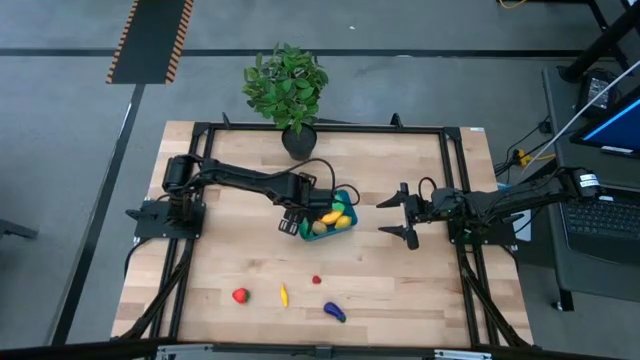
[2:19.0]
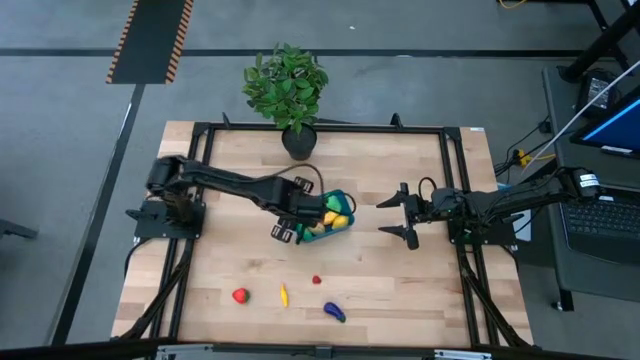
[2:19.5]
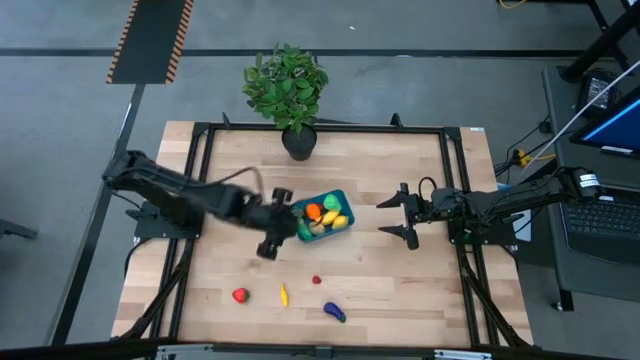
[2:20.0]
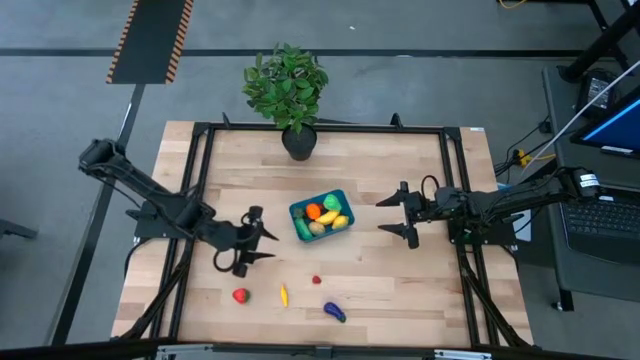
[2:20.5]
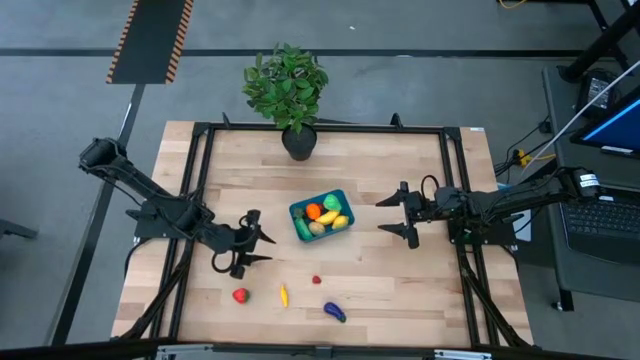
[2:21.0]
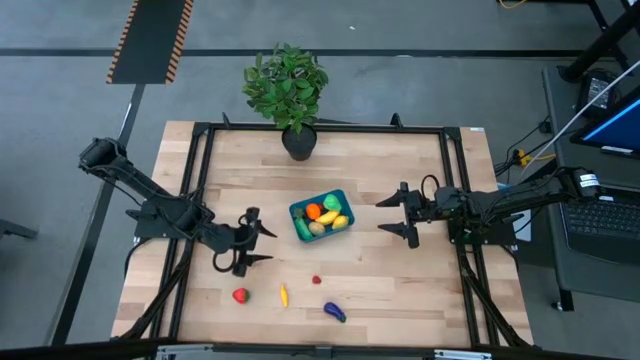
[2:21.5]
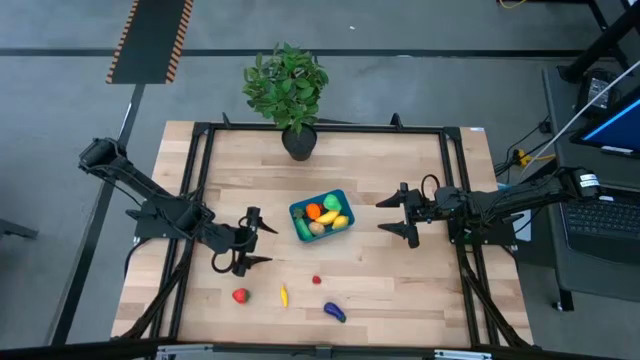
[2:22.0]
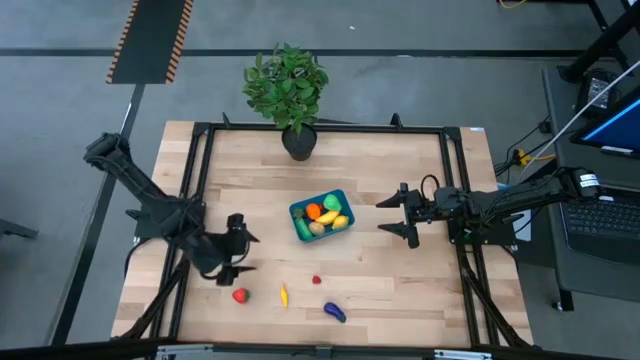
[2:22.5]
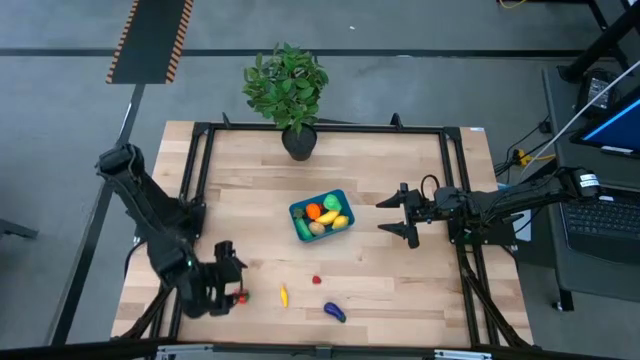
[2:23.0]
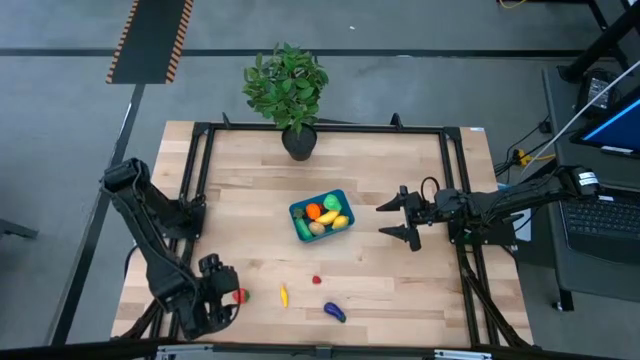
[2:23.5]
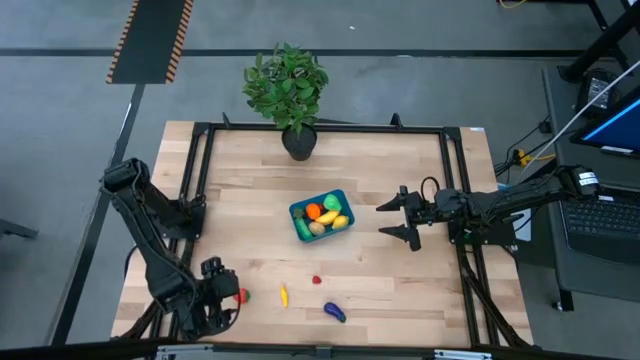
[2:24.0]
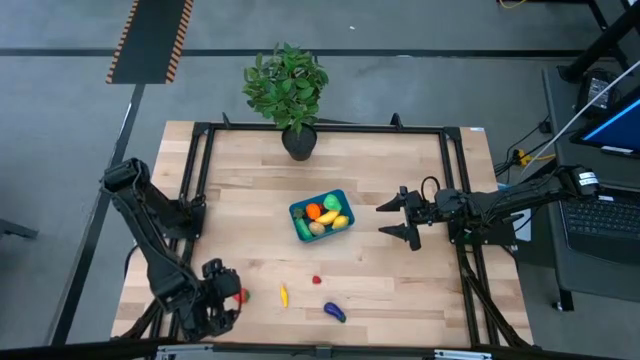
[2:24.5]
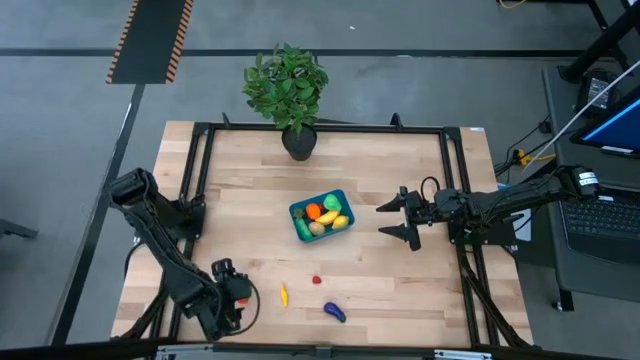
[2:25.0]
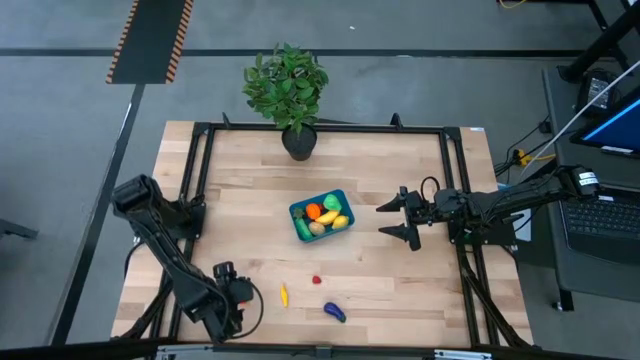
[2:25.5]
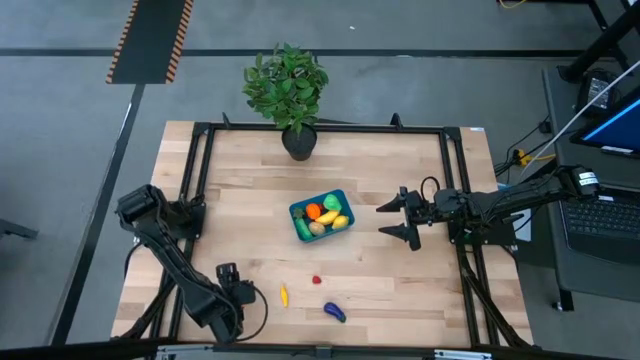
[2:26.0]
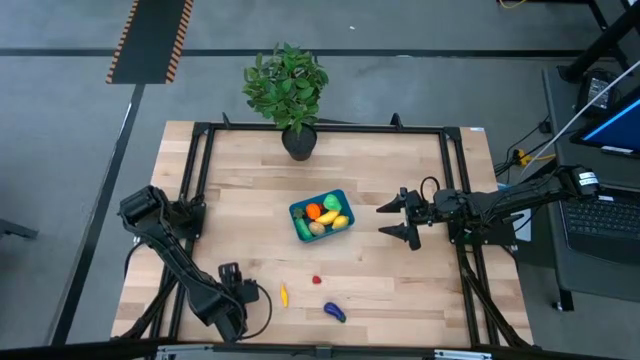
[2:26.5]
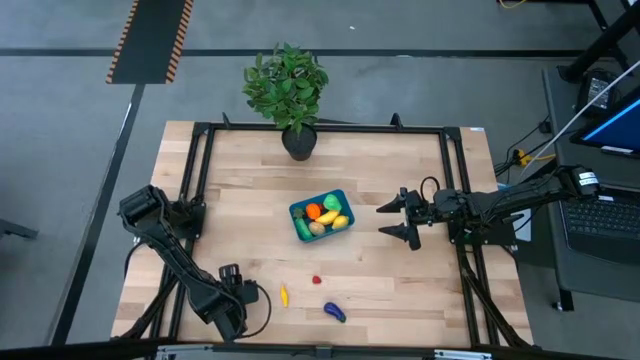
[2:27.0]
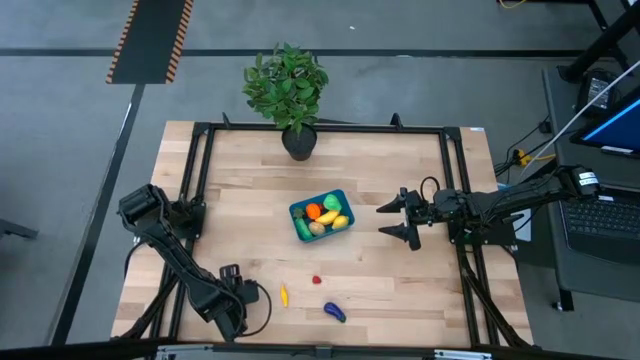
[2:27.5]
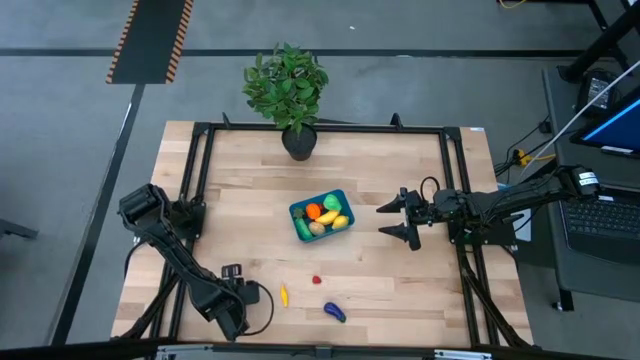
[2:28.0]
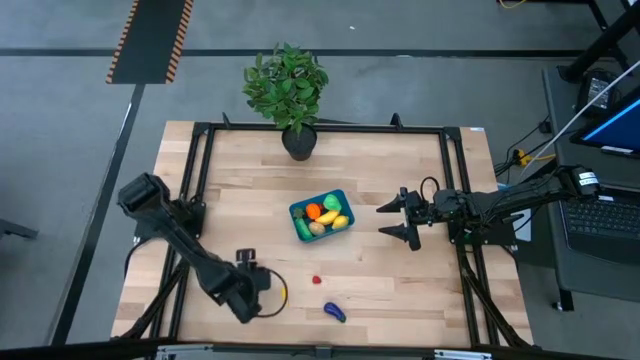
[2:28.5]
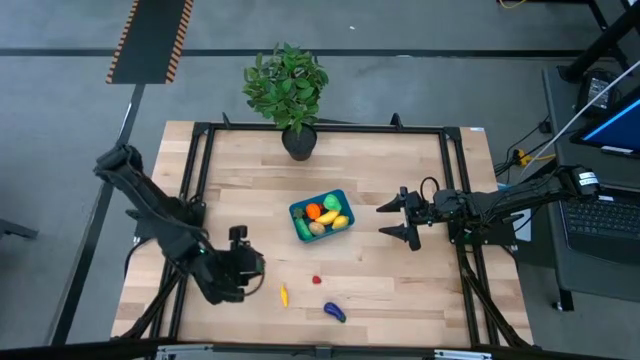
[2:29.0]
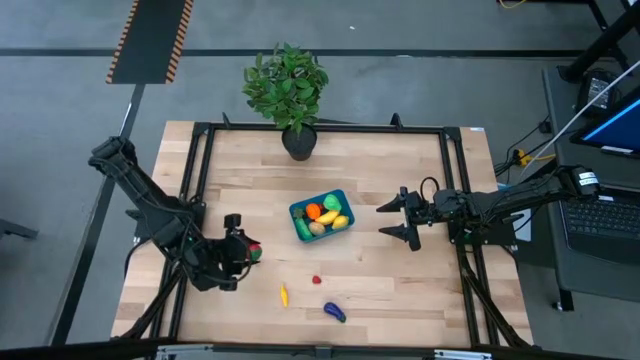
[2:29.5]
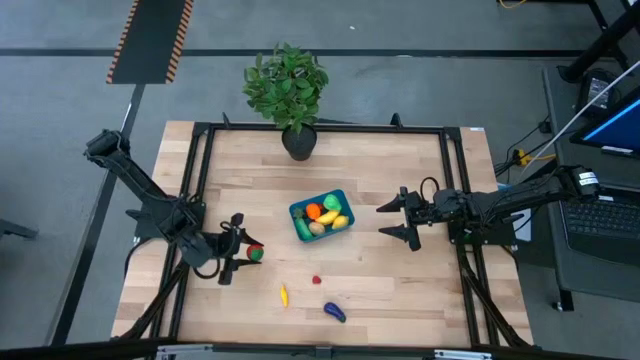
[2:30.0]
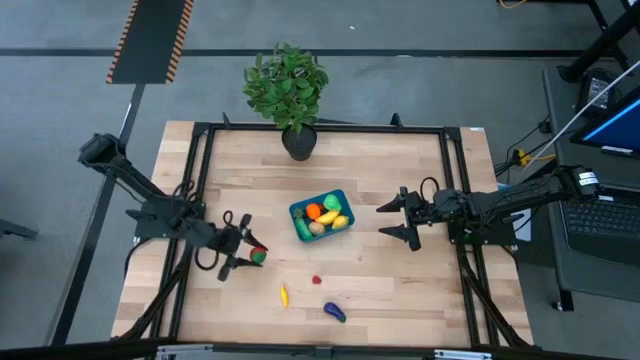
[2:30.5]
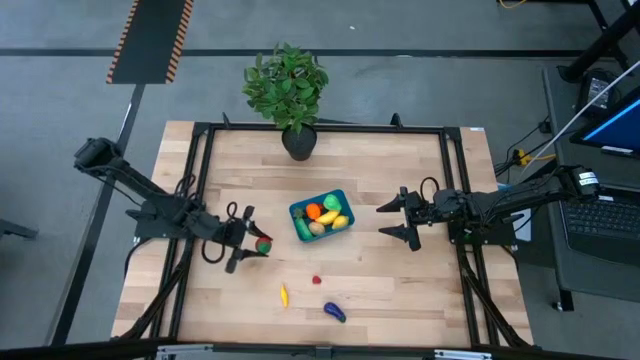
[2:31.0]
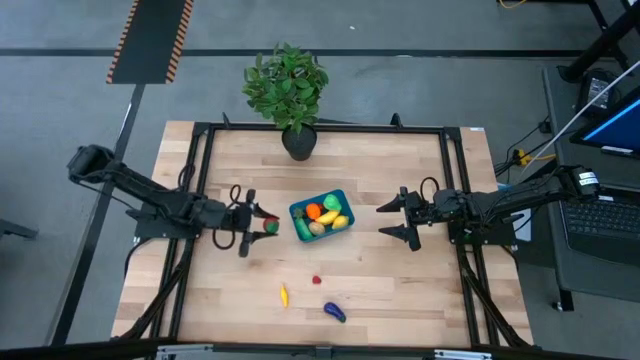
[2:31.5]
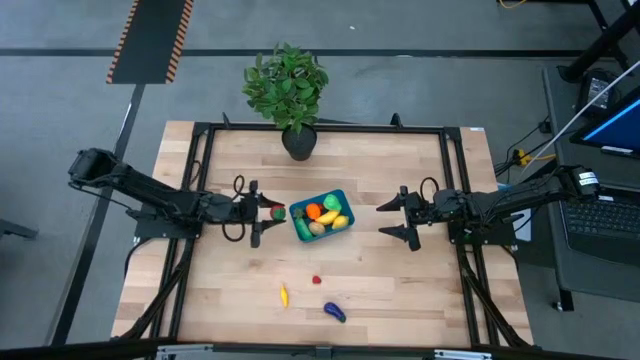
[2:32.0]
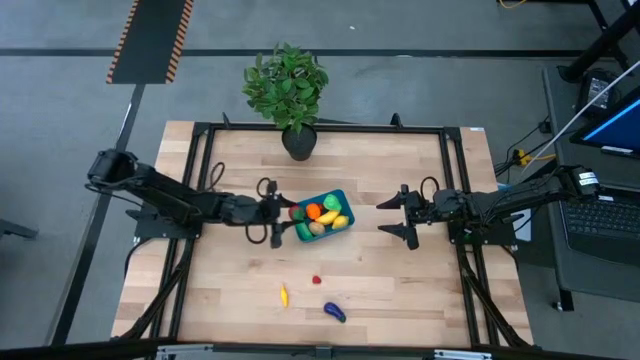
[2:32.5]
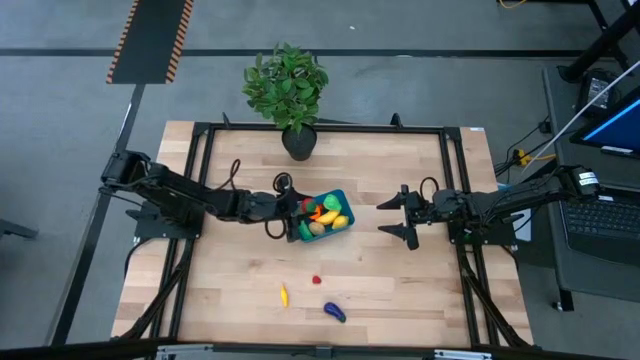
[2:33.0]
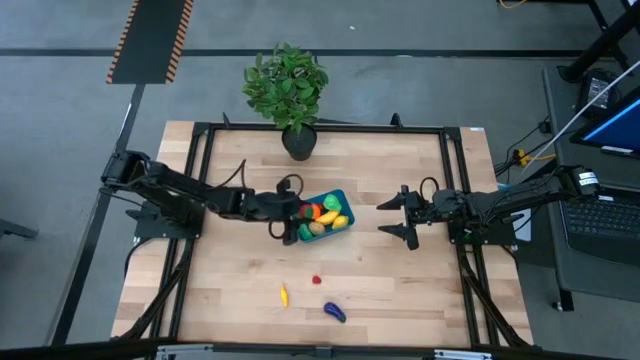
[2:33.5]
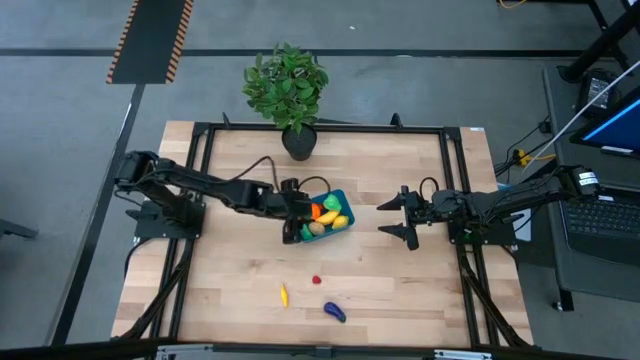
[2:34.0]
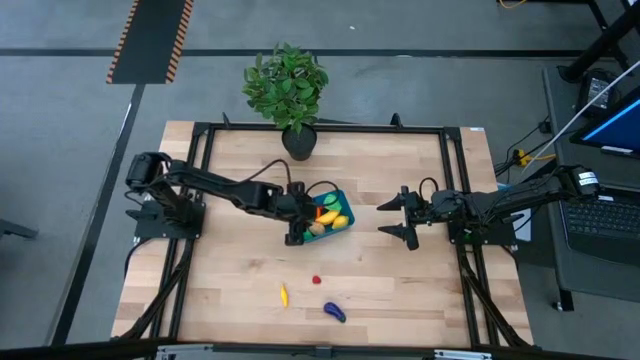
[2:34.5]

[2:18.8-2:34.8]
Task: Pick and placing Produce into tupperware
Put the red strawberry into the blue bin

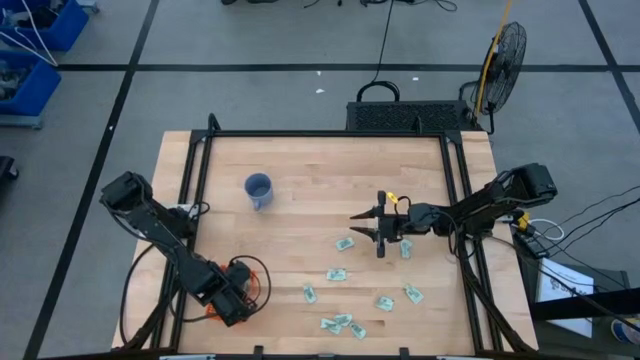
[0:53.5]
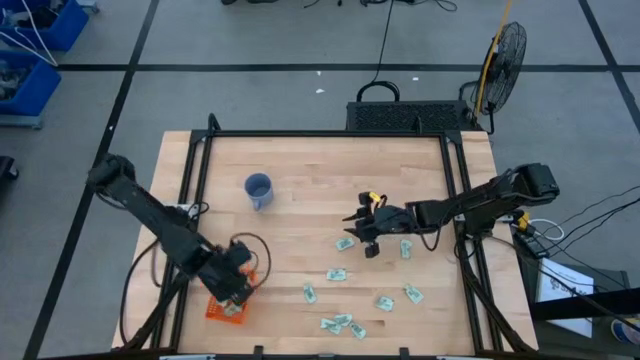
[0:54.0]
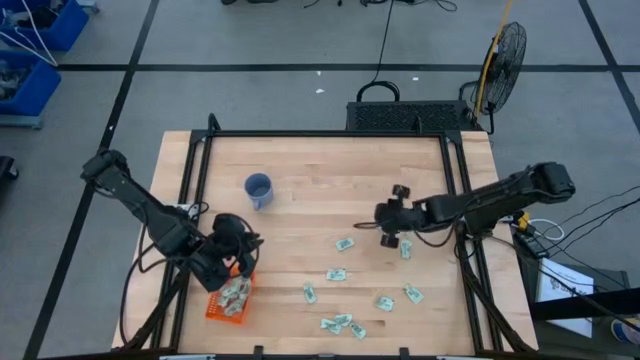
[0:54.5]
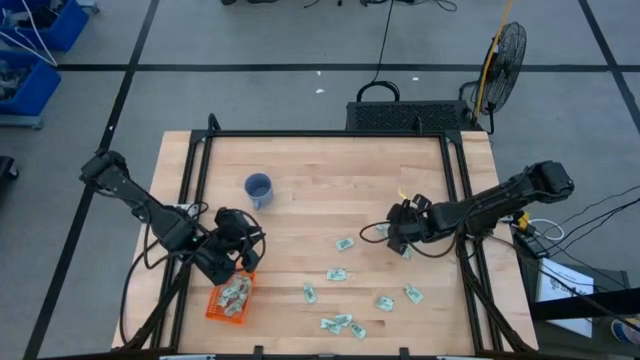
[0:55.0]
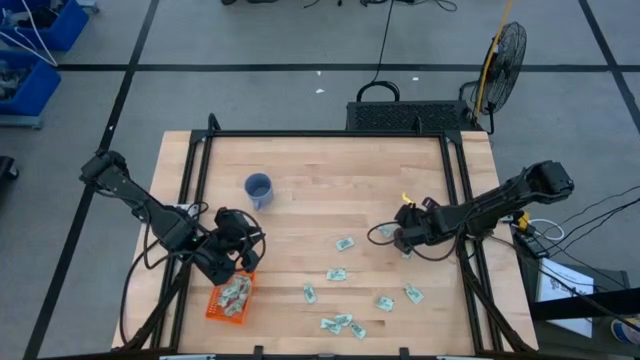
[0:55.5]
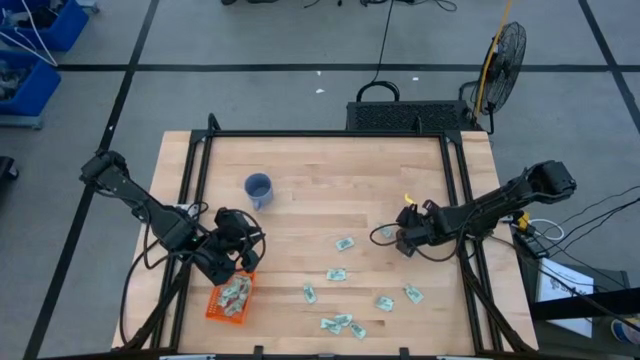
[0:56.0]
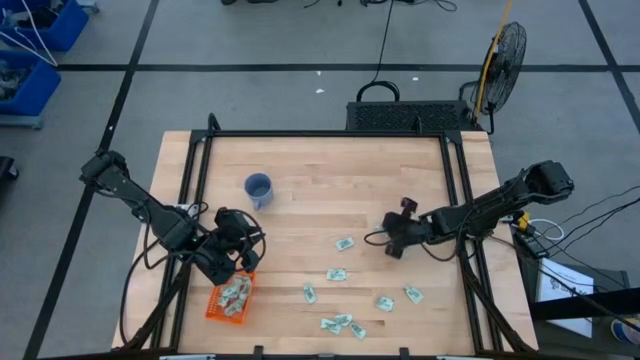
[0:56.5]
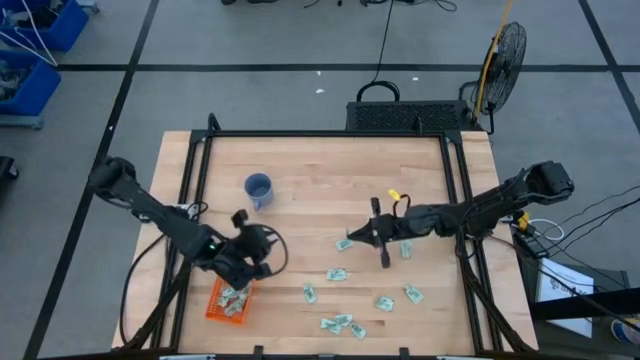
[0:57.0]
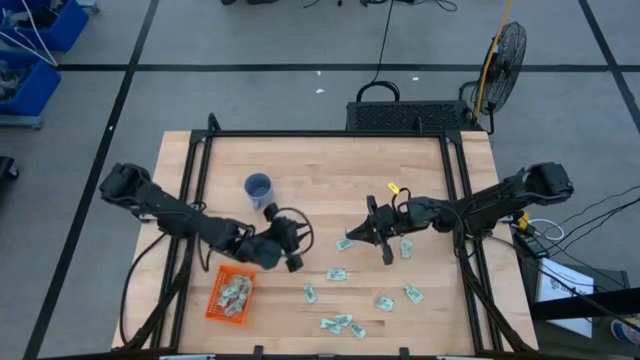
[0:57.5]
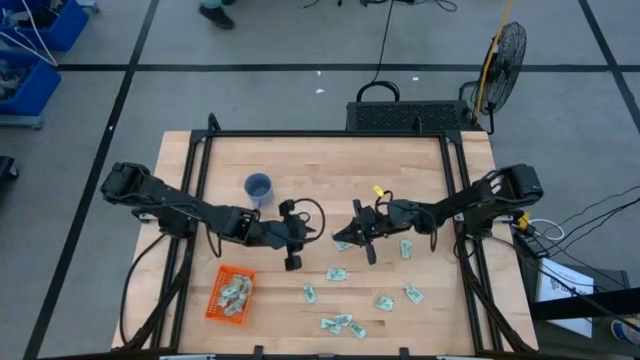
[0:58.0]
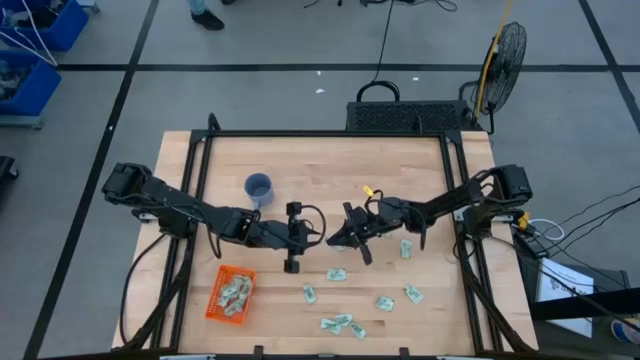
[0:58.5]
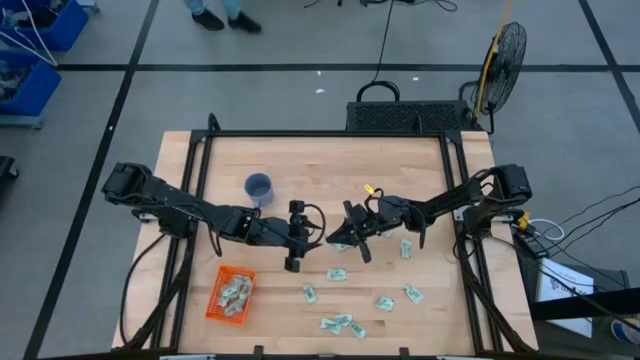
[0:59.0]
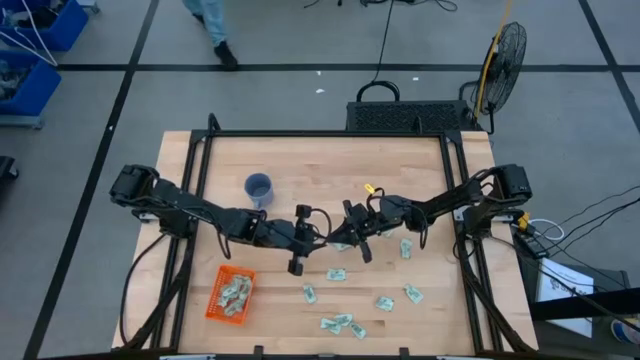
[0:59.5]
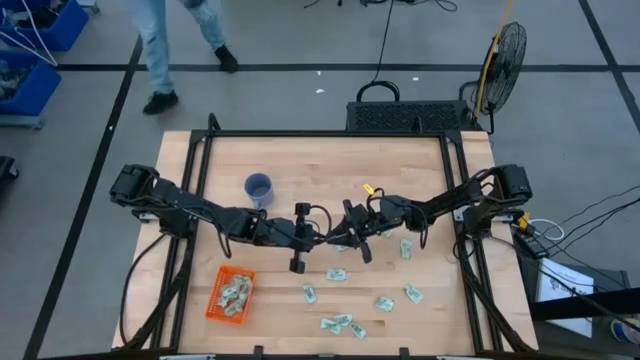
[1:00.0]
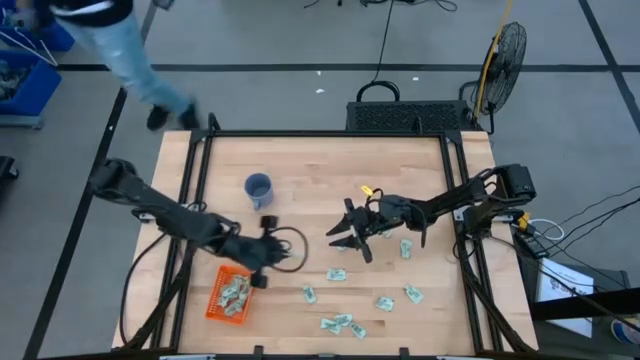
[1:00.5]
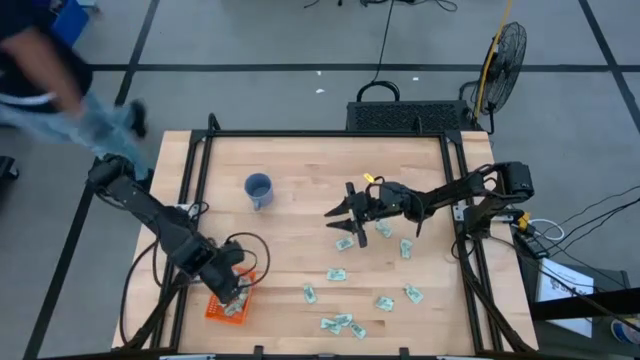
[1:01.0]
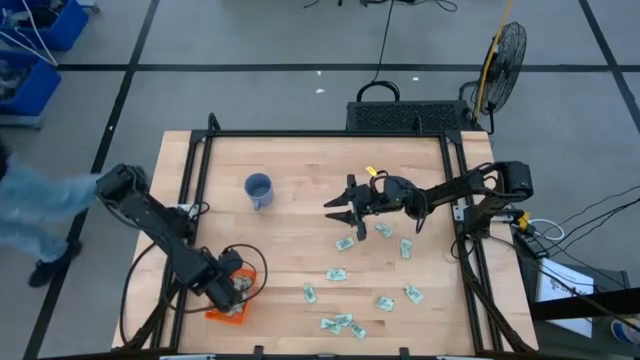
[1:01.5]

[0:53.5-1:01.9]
Task: Pick and place Stevia / Truvia into bins
Put the stevia packet into the orange bin
